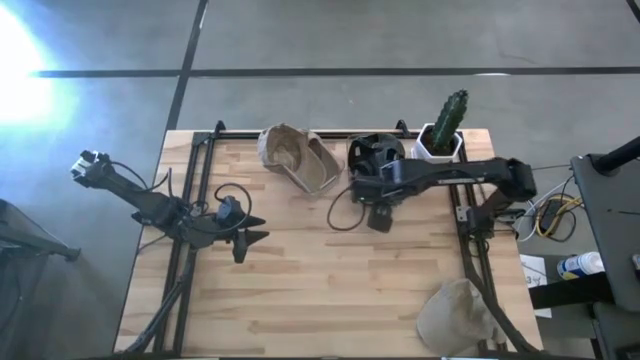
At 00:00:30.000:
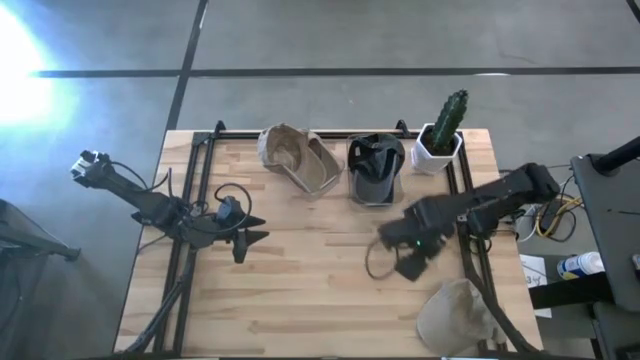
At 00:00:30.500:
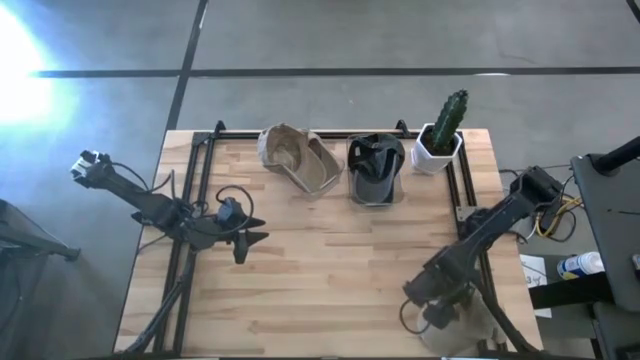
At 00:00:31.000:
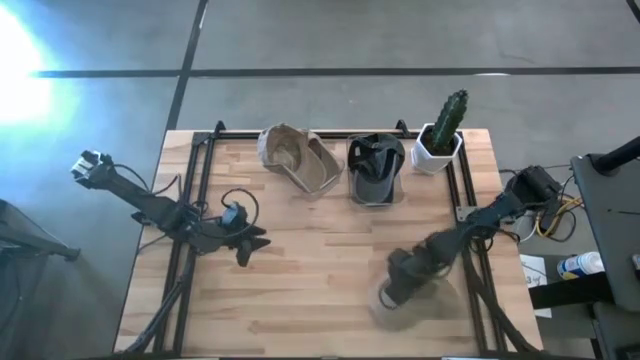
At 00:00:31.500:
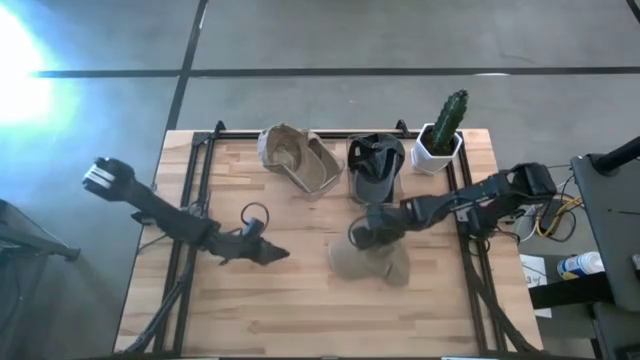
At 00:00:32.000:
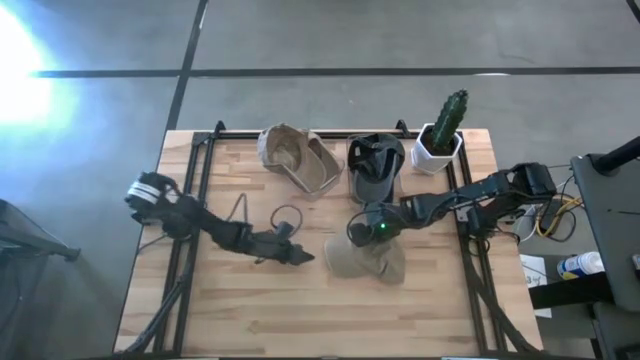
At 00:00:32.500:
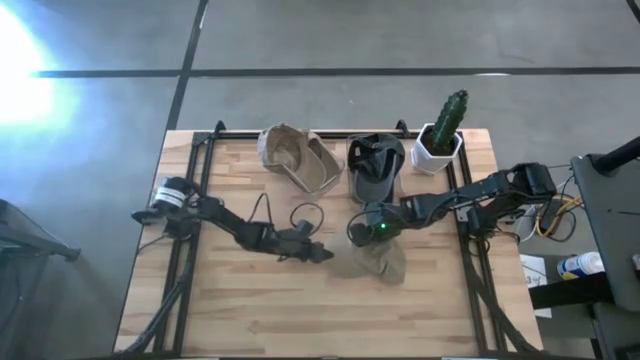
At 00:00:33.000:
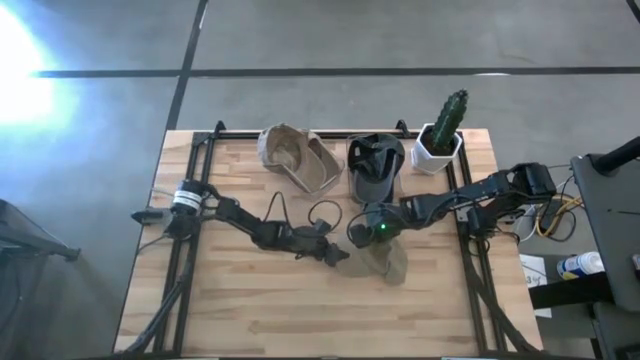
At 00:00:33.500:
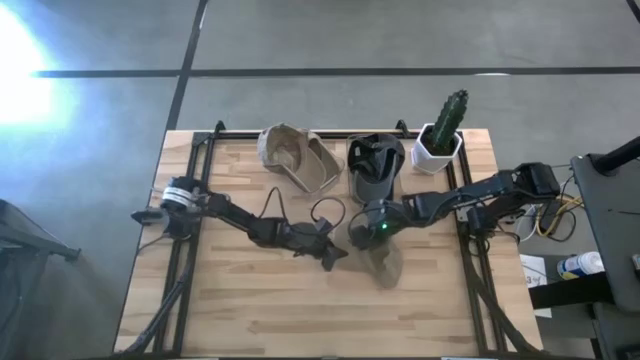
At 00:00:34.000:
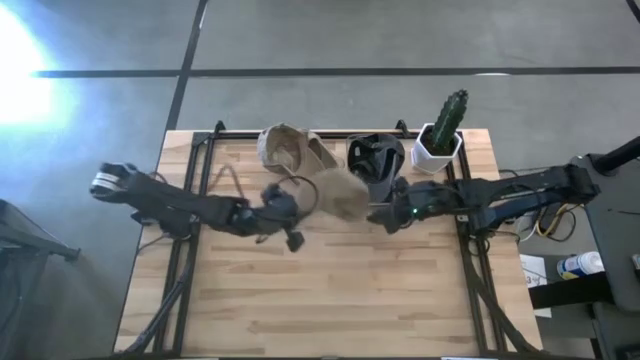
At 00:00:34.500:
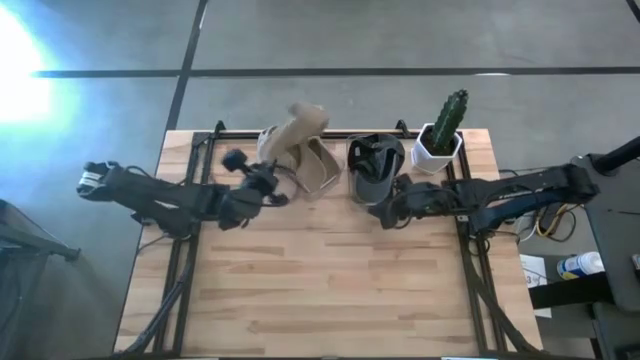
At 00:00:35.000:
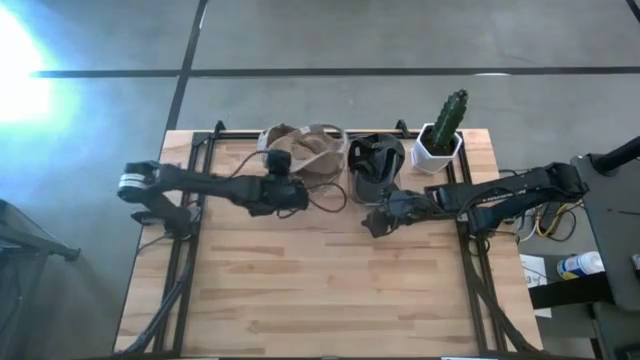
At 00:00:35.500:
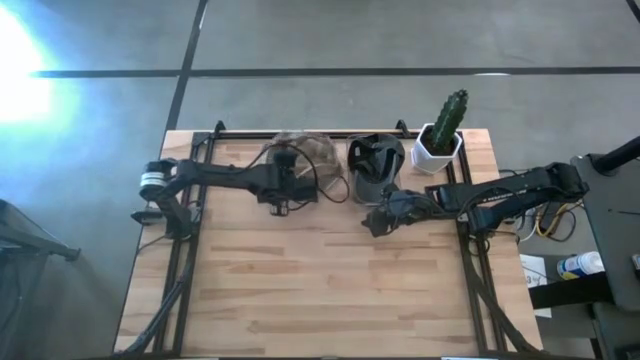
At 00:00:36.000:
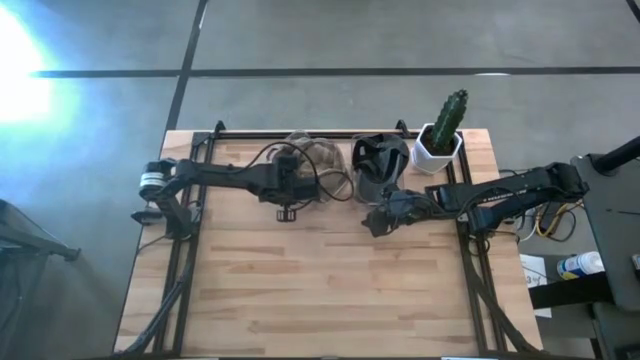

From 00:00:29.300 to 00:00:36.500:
Task: Pick & Place hat
Put the brown cap into the left transparent bin

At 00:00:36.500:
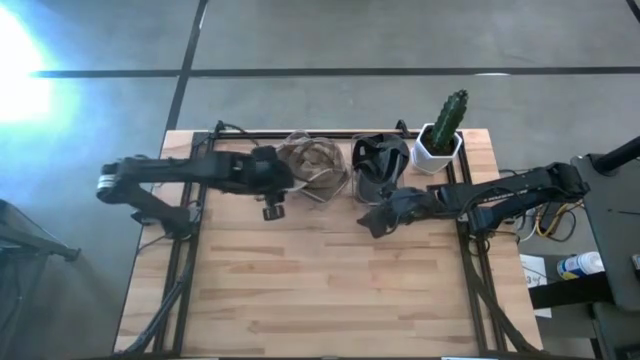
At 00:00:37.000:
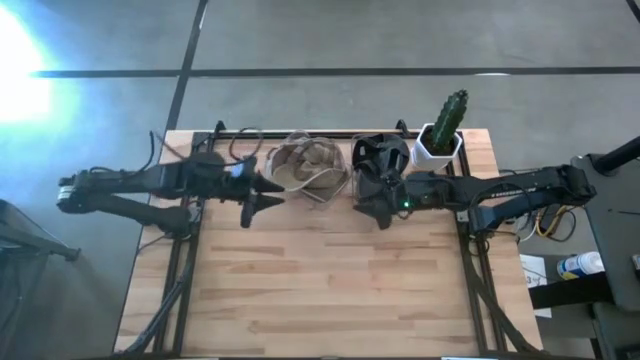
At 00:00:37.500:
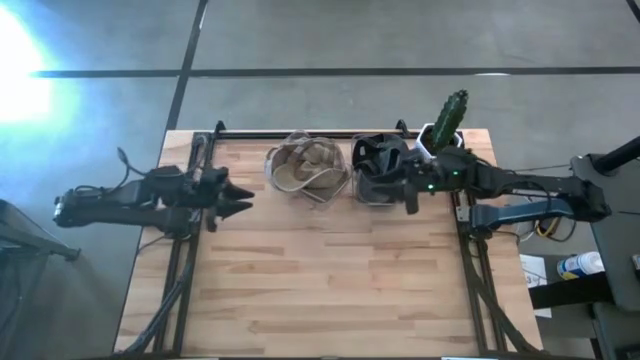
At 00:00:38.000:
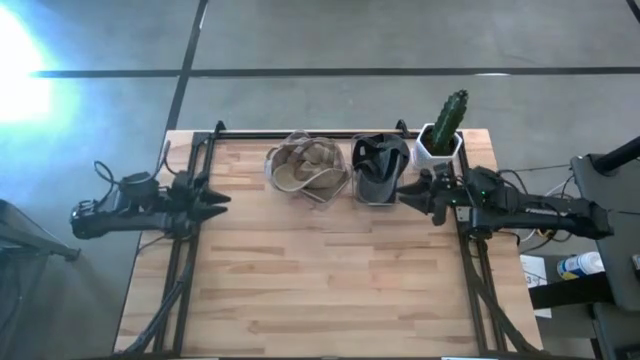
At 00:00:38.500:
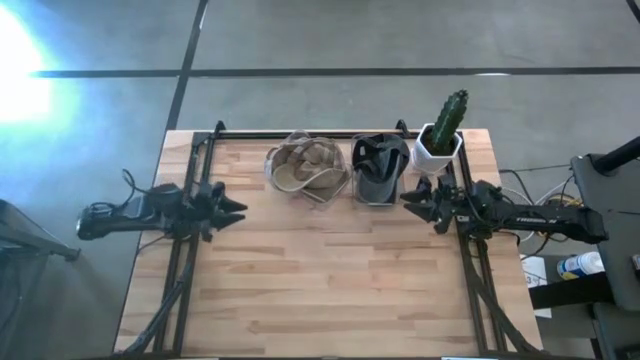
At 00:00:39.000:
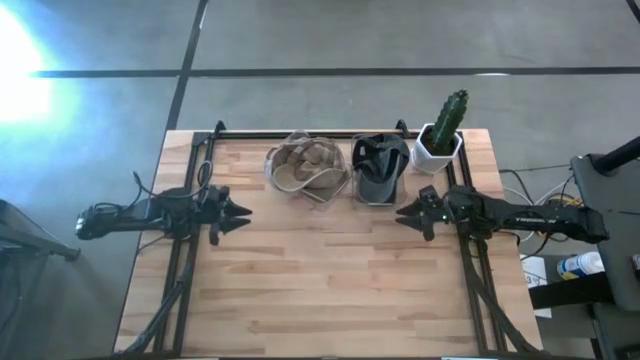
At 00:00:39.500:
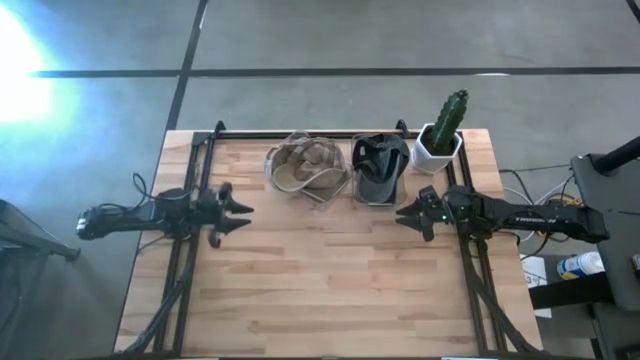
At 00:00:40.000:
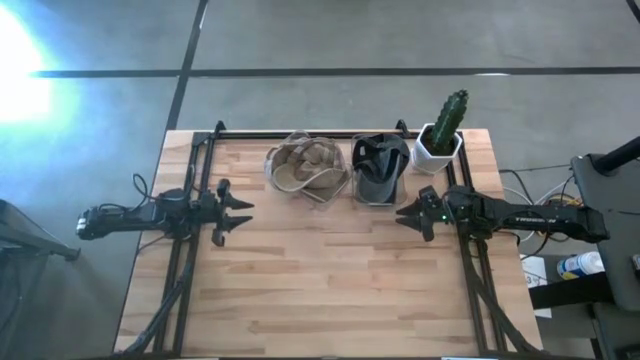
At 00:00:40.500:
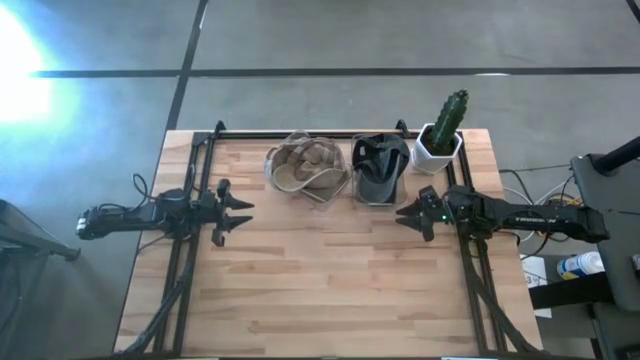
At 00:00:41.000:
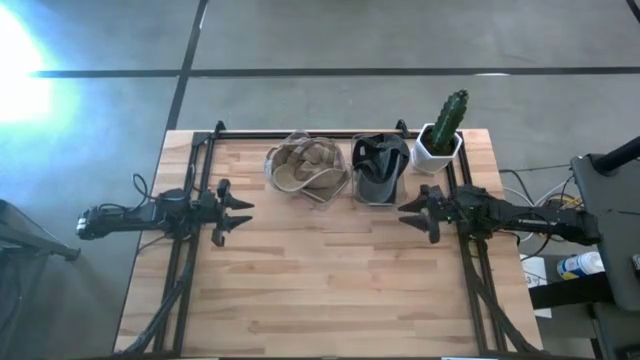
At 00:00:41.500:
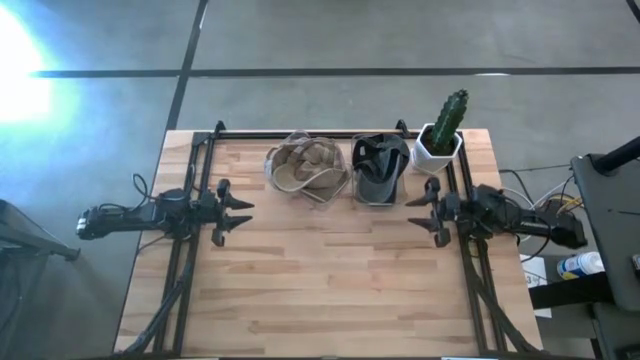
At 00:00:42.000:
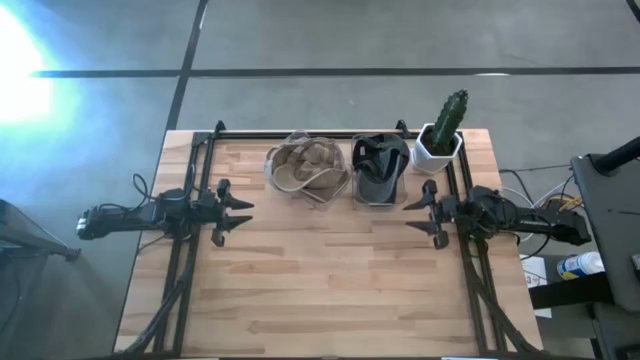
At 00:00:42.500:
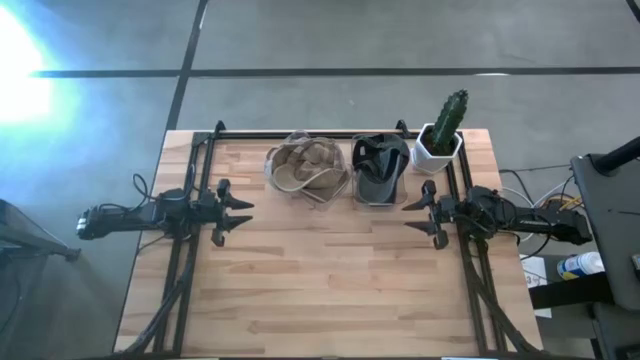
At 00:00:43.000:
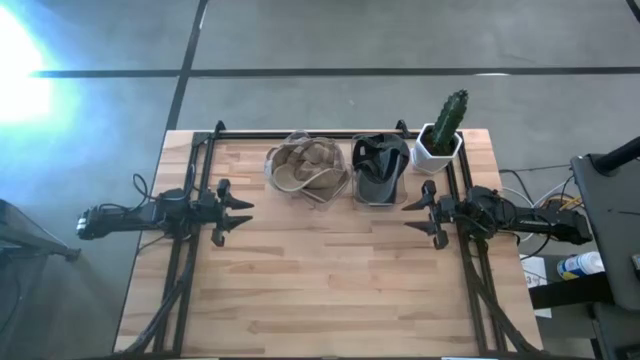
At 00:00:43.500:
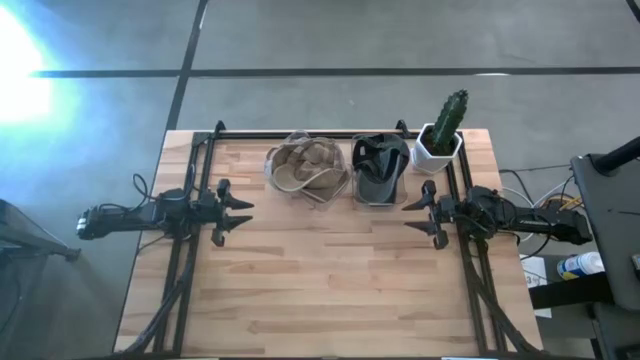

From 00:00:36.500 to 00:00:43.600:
Return to Home Position

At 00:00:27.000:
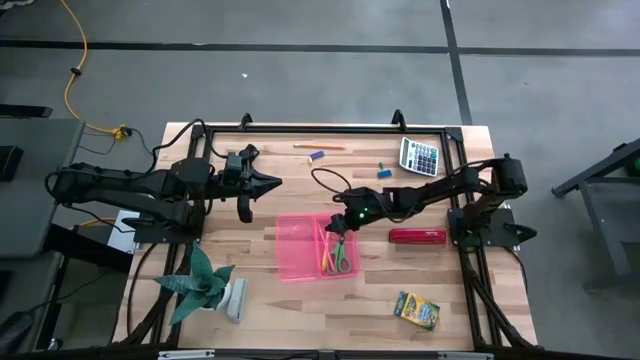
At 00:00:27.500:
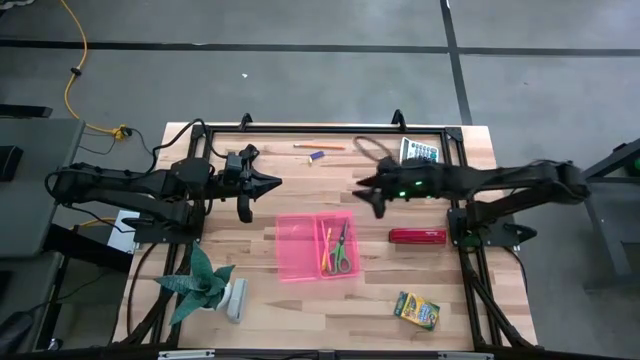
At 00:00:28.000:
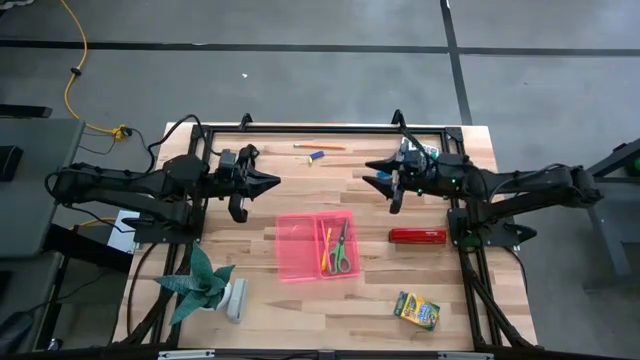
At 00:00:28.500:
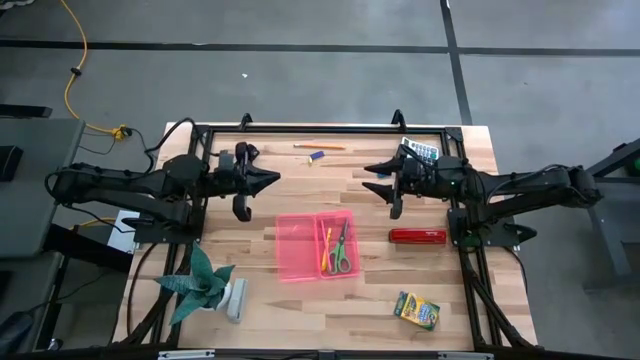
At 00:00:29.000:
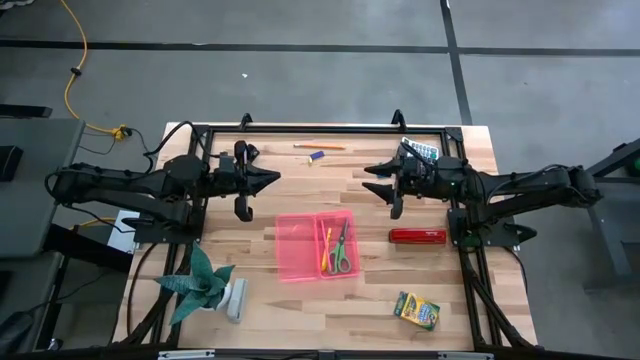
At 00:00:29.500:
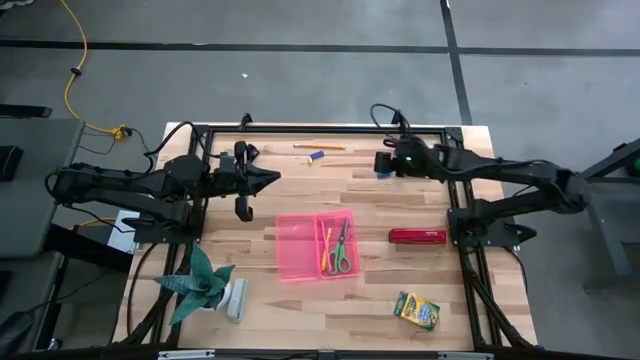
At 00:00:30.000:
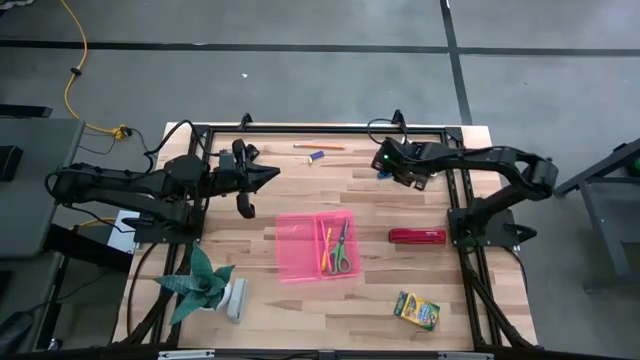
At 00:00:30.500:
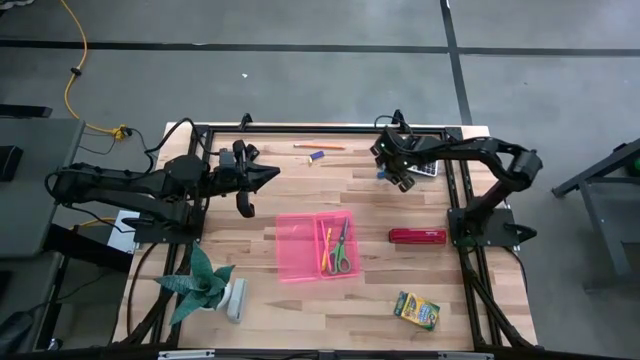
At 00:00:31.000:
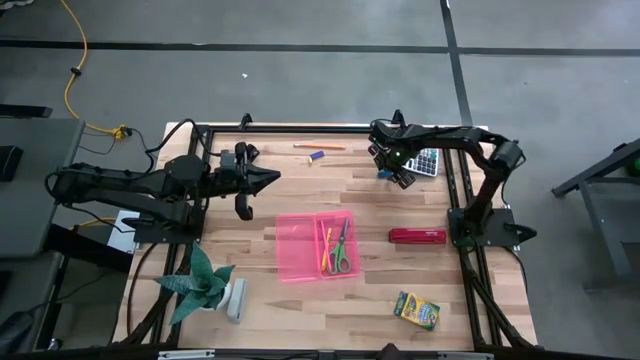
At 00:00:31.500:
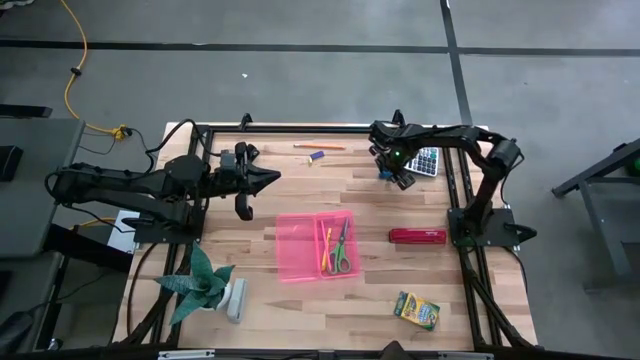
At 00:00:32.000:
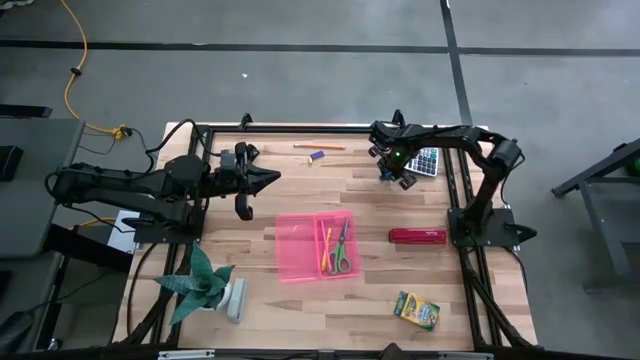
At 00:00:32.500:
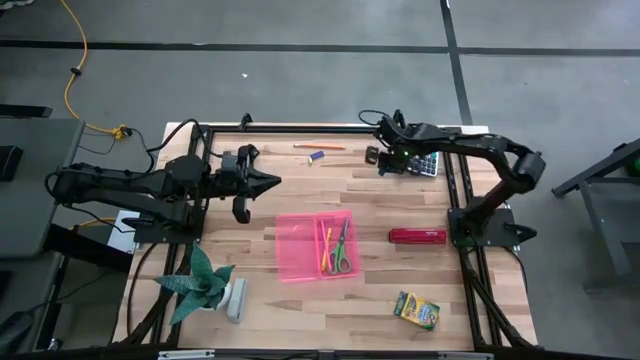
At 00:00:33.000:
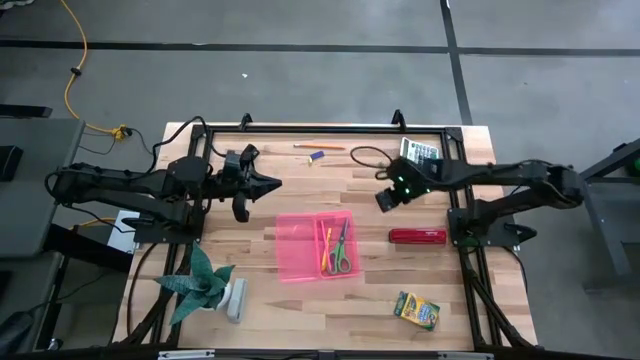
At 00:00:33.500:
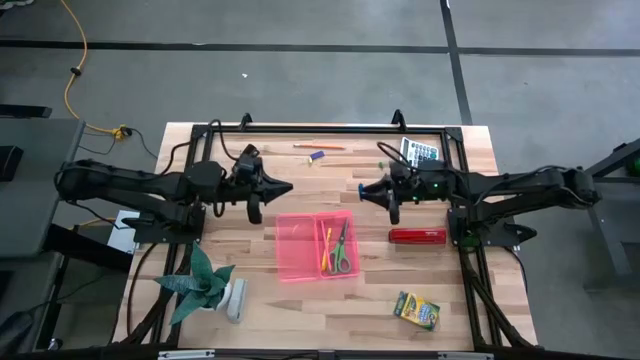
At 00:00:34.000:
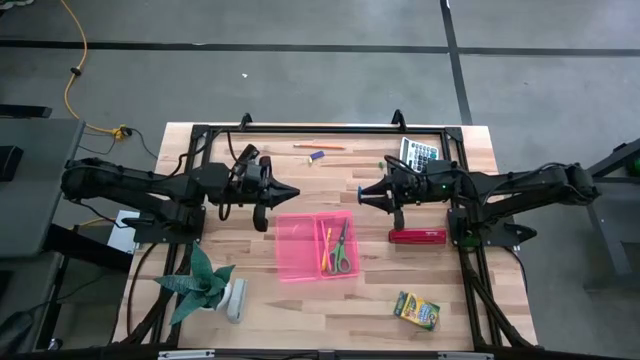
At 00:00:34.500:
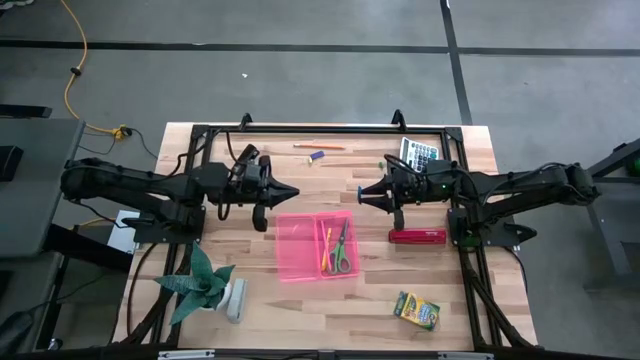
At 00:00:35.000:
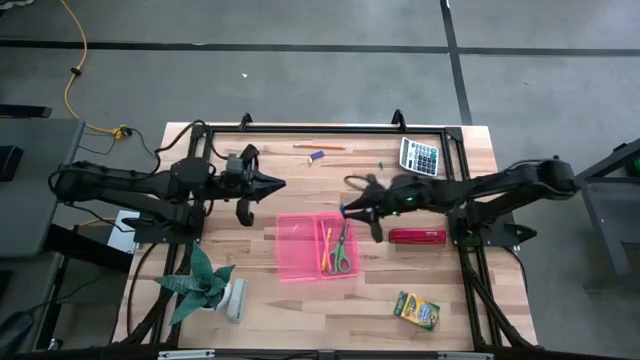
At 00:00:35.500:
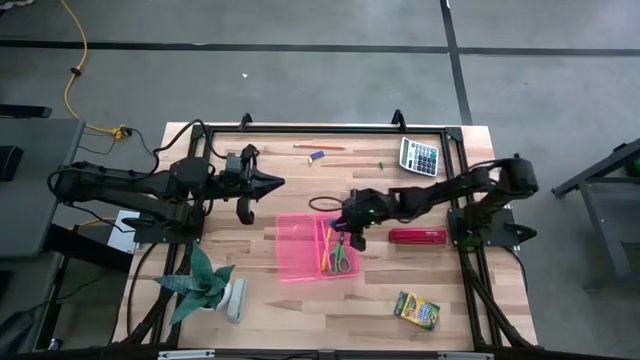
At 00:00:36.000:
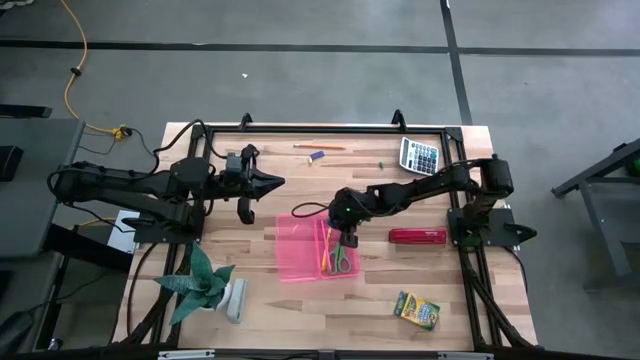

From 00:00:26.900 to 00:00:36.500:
Task: Pack school essentials
Put the blue eraser into the pink supply box
